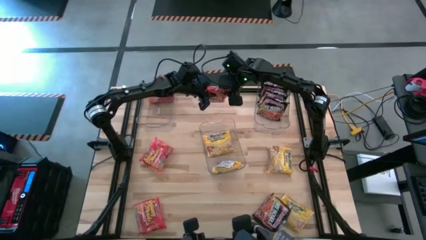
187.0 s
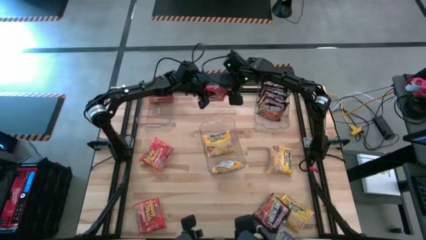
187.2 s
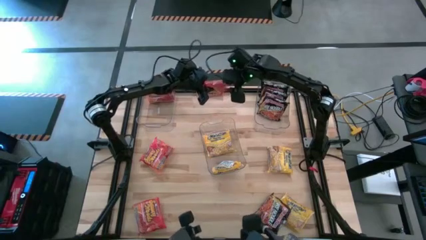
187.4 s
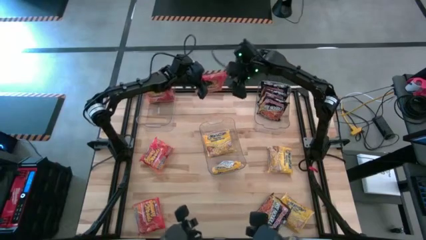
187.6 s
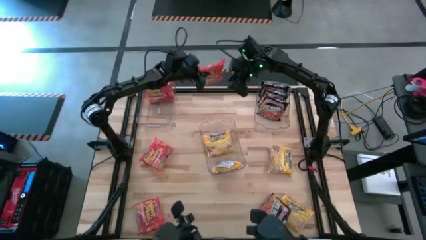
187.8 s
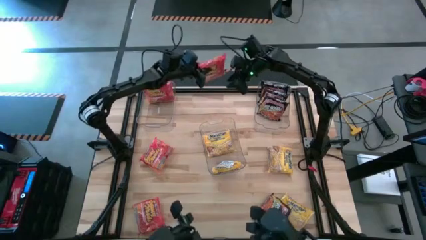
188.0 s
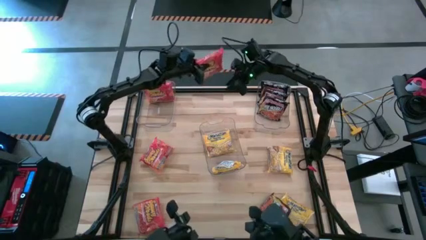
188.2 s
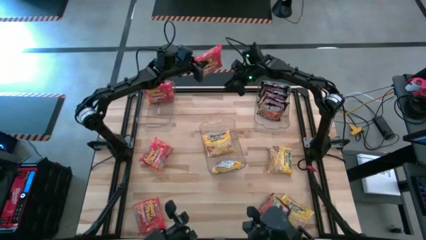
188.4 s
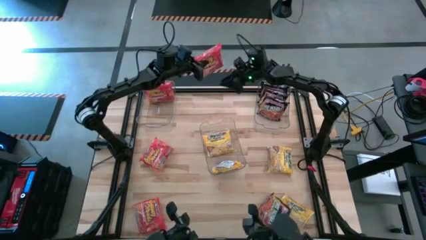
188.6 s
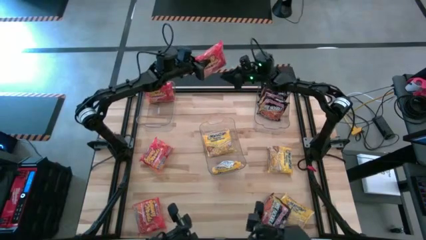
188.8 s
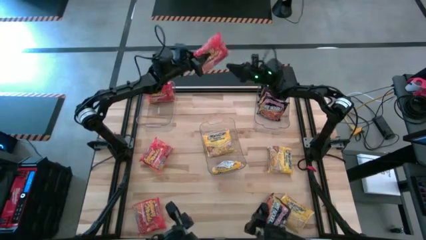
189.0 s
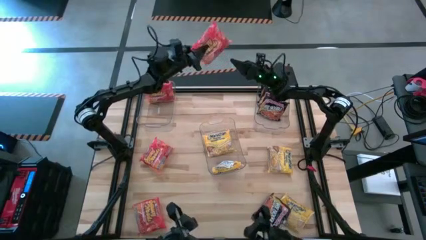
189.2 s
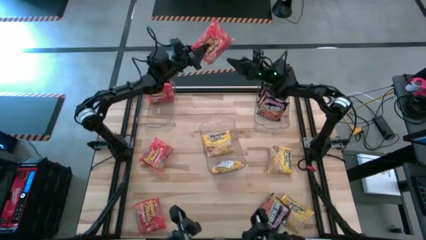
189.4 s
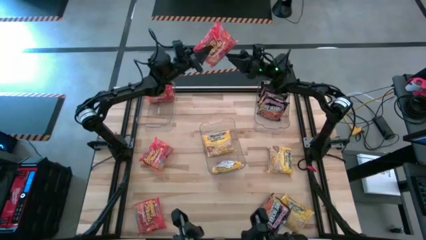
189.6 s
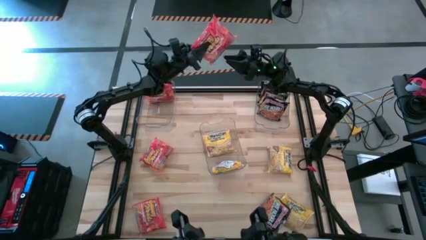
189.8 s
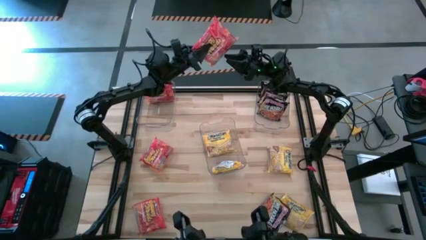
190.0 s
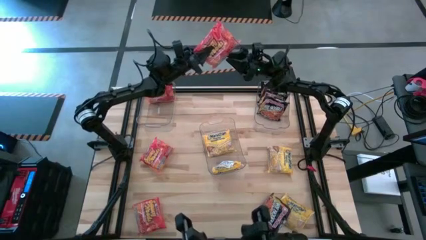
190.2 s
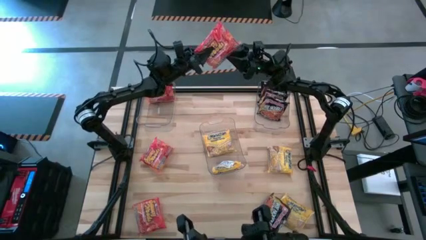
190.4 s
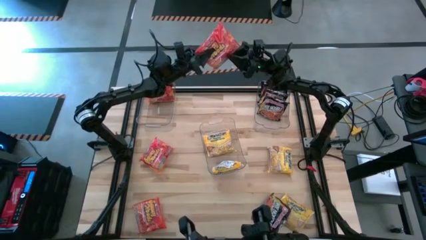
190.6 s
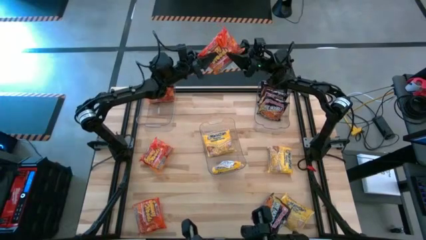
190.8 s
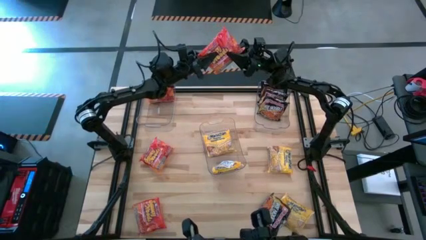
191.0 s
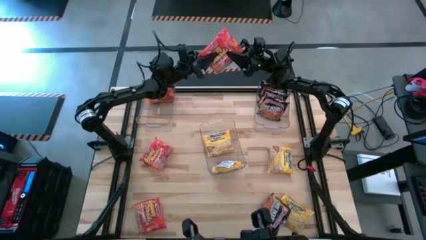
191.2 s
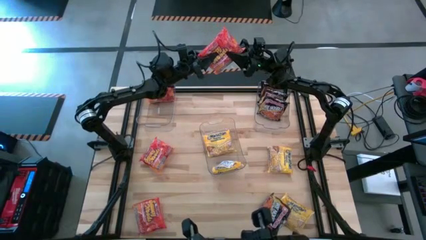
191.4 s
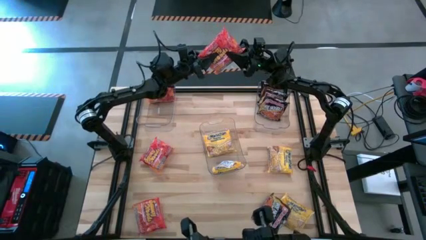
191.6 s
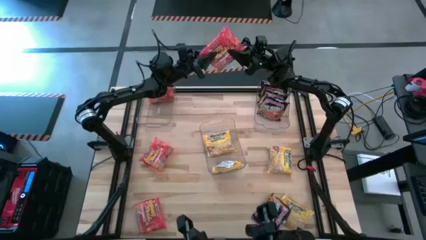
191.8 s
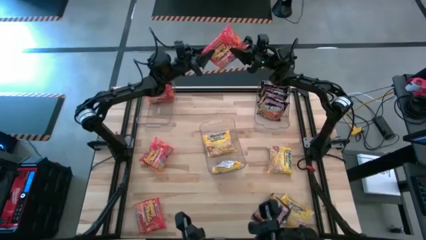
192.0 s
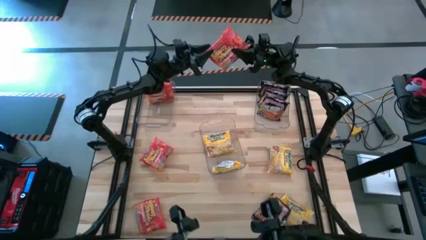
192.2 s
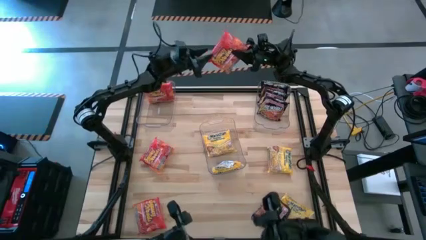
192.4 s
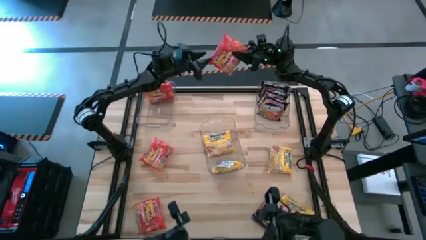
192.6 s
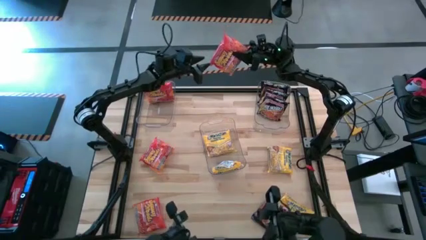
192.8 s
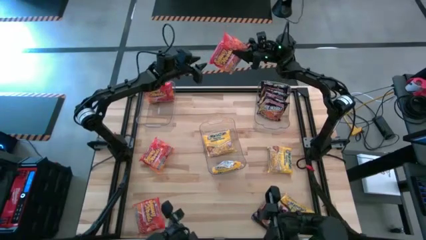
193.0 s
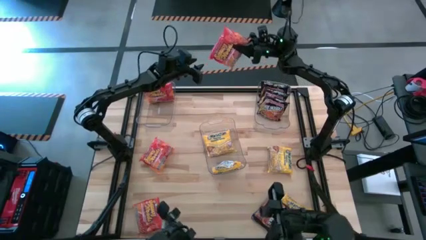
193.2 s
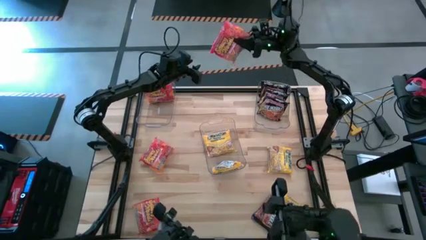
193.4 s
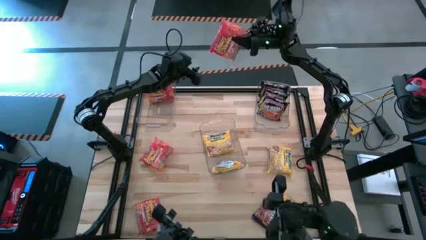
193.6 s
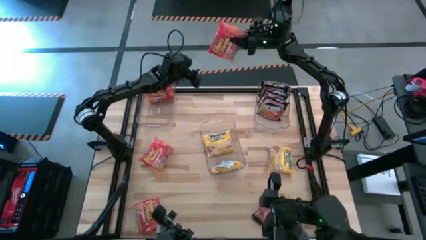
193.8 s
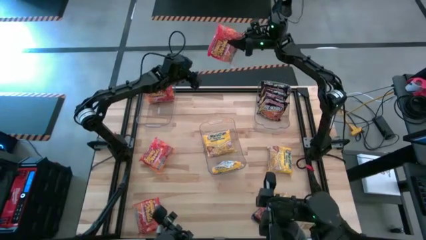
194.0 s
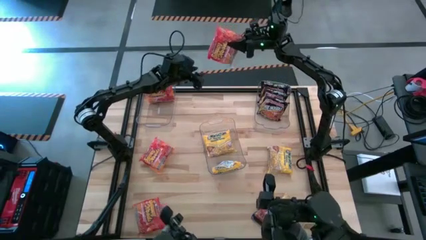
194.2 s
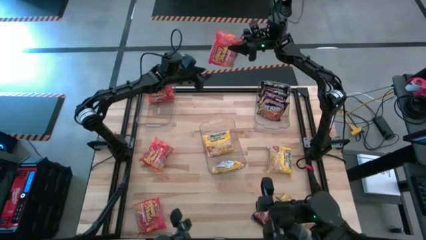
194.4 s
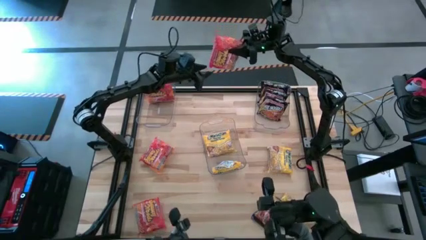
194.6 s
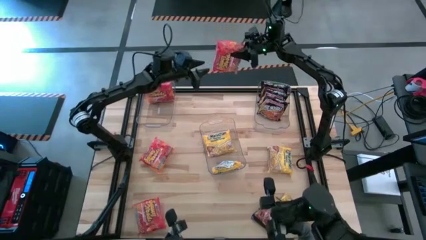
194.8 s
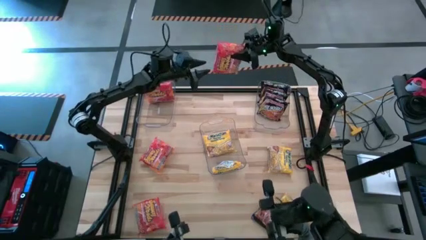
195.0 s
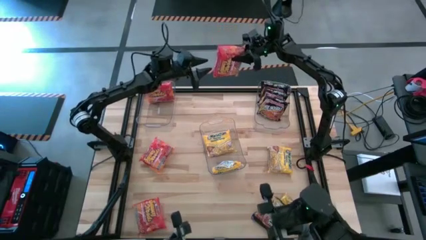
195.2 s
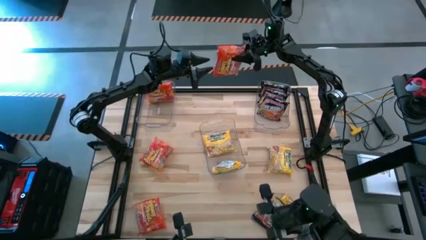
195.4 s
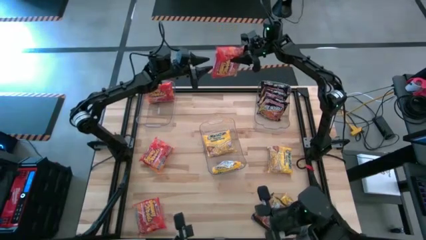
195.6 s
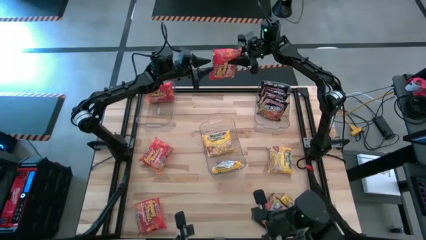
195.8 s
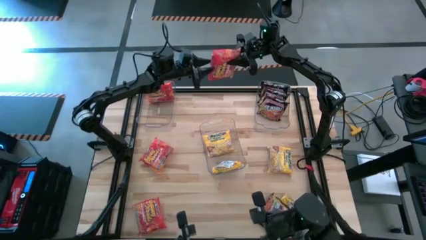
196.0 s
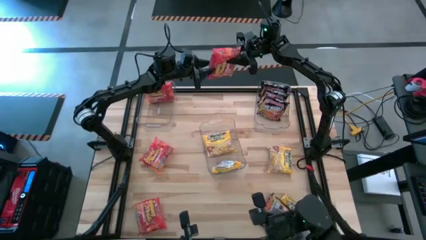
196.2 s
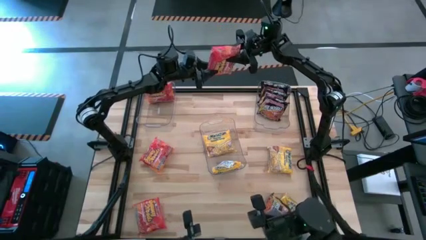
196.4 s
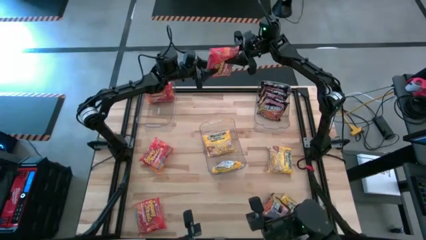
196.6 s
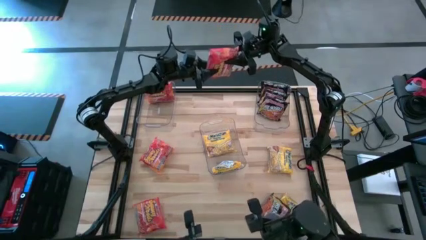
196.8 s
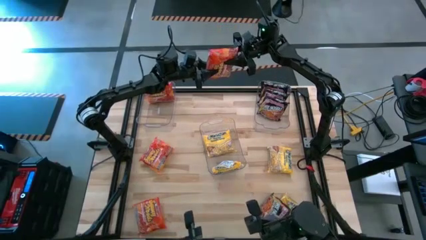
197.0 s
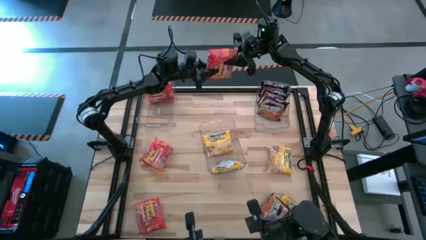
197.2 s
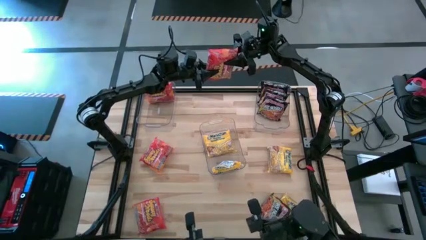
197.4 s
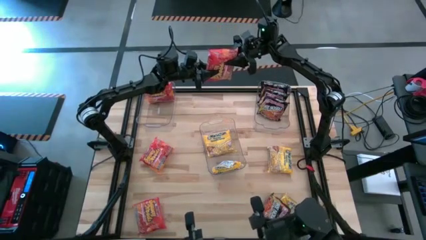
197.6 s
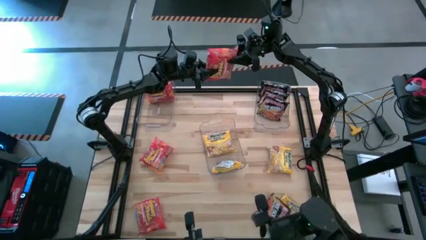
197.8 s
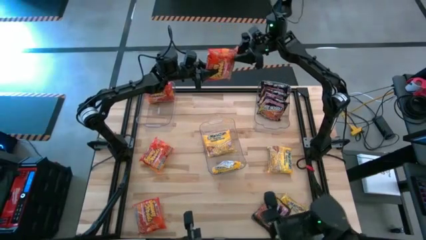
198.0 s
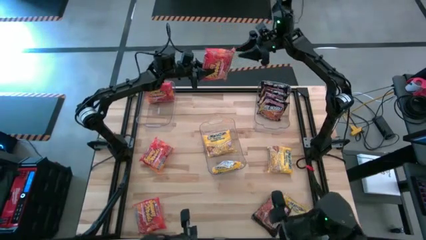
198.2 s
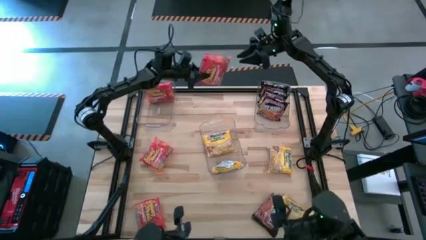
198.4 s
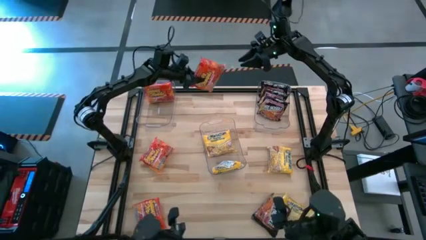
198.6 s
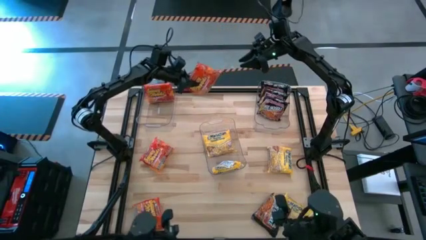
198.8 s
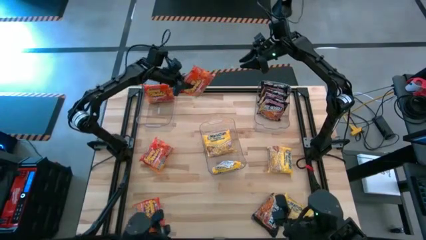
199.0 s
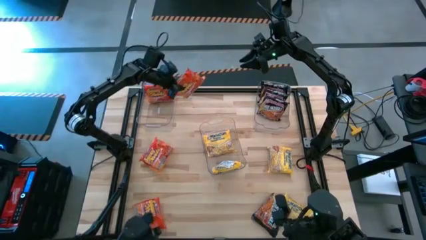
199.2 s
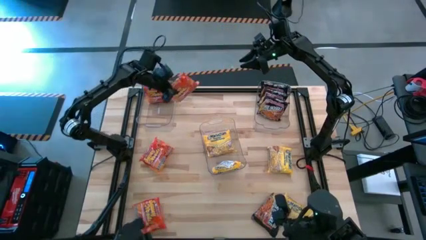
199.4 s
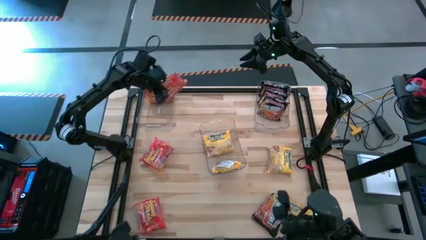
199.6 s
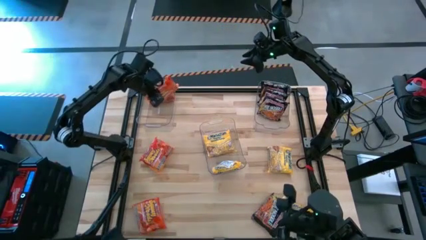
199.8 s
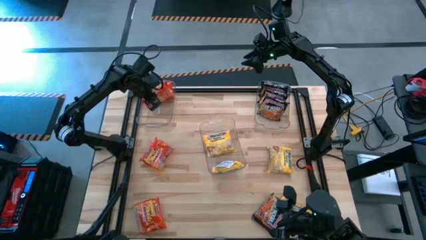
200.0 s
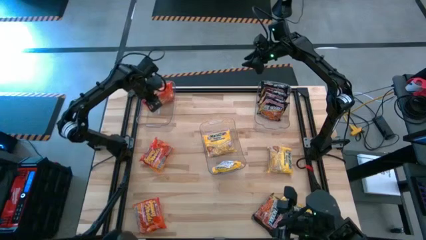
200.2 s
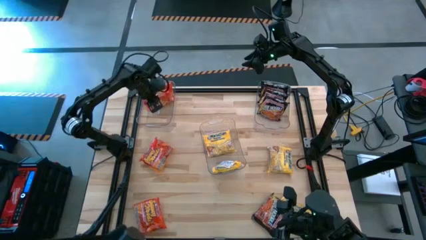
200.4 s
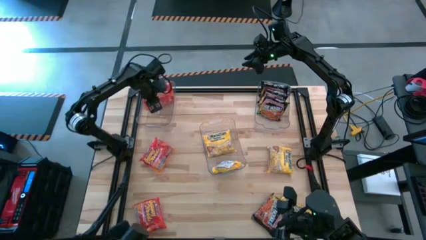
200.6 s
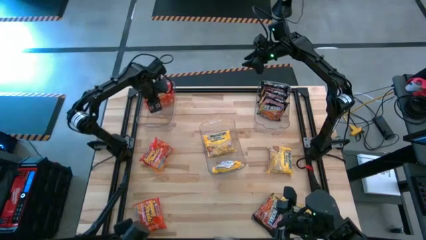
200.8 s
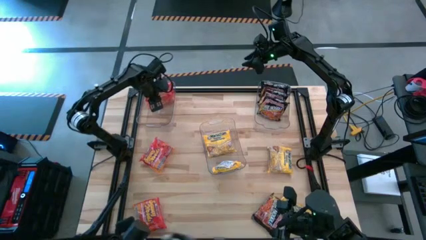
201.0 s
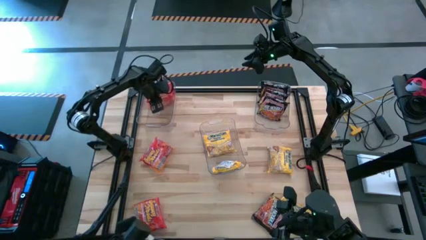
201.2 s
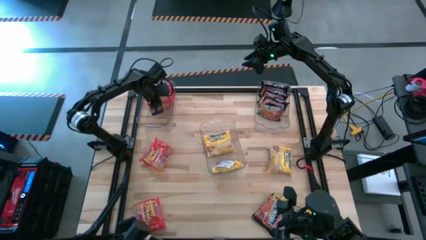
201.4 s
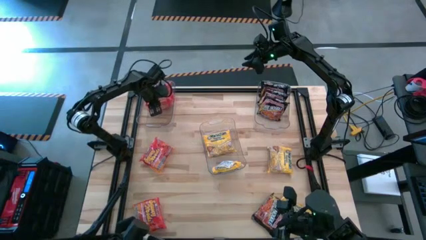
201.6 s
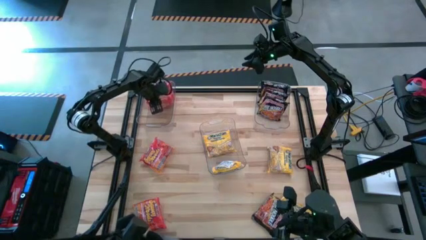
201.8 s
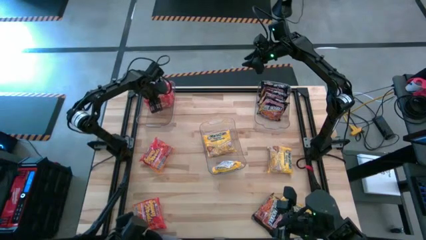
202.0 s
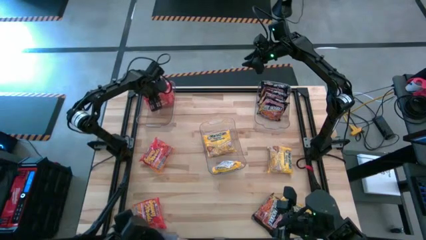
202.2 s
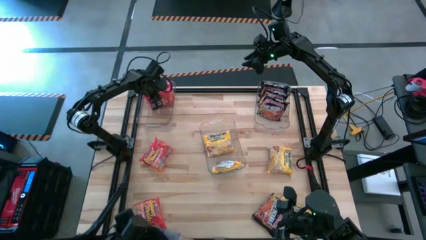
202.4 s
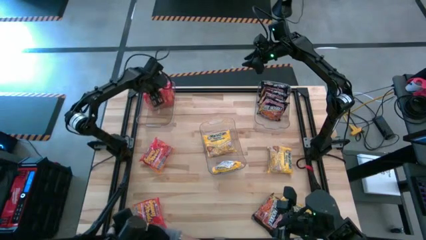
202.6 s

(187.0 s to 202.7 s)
Task: Sort Maruchan noodles
Put the top right orange noodle pack into the top left transparent bin

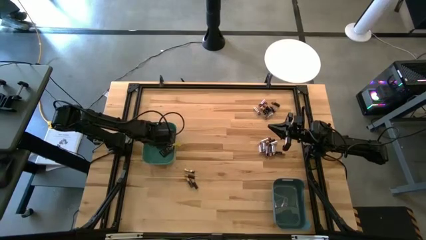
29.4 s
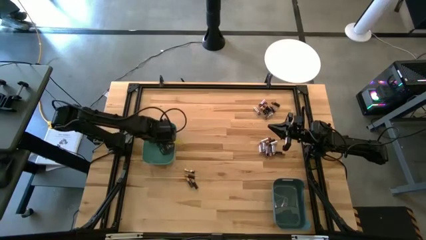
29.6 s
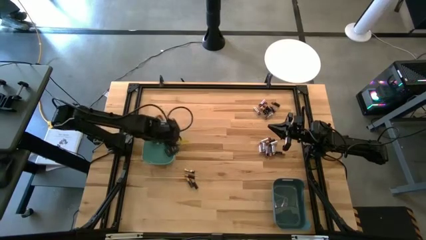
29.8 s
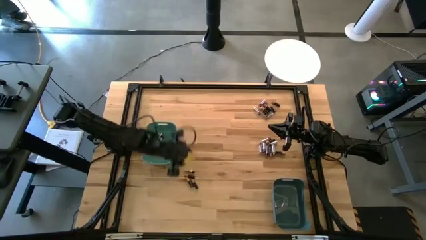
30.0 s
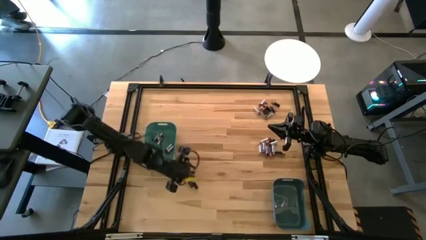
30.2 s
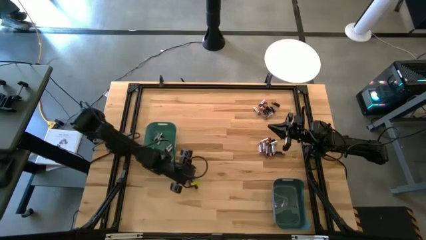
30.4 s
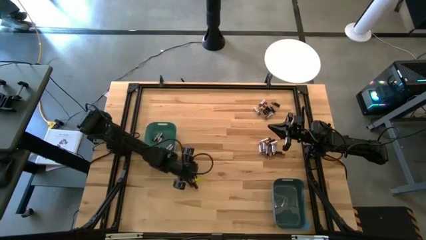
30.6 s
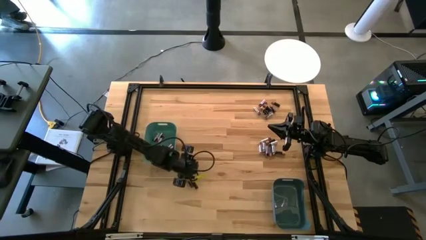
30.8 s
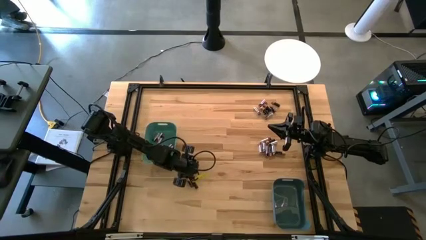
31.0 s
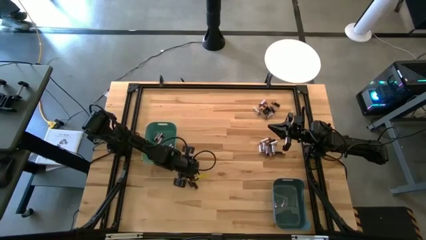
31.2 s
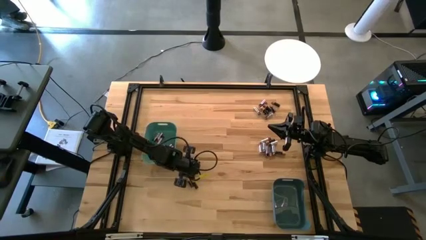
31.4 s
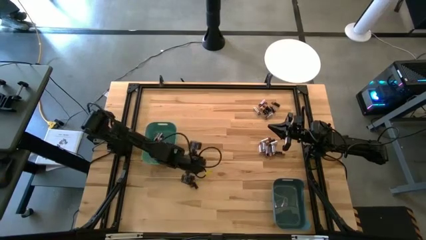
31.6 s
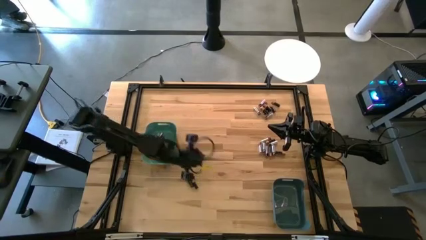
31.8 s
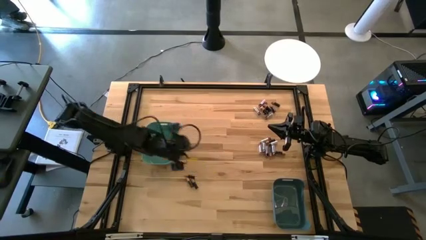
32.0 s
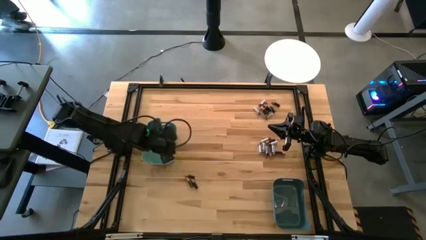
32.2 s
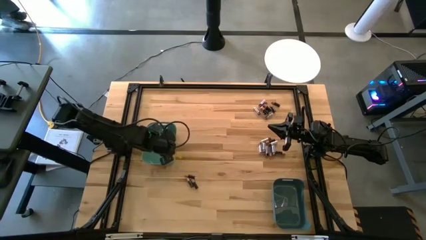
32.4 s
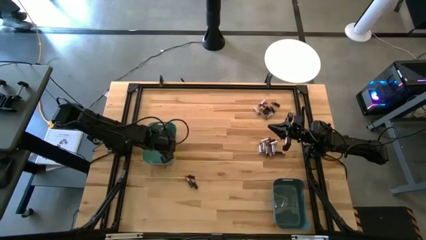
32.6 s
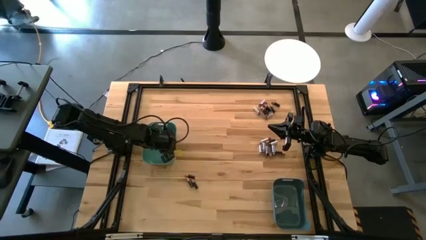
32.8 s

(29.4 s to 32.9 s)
Task: Sort batteries
Put the silver battery into the green bin
